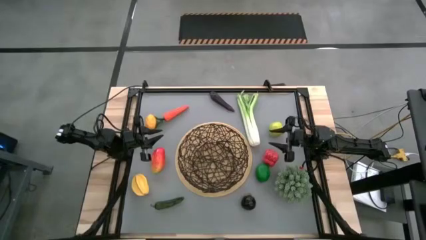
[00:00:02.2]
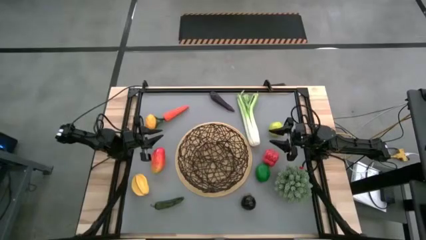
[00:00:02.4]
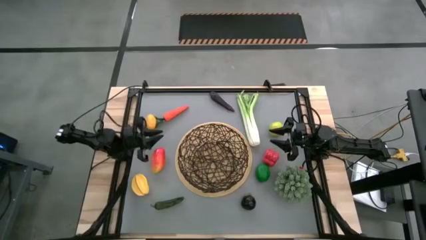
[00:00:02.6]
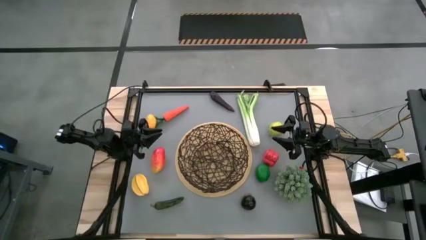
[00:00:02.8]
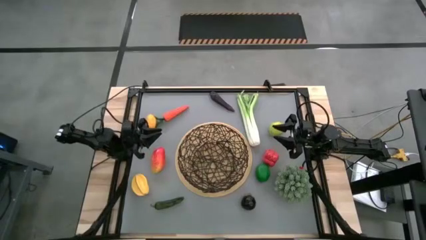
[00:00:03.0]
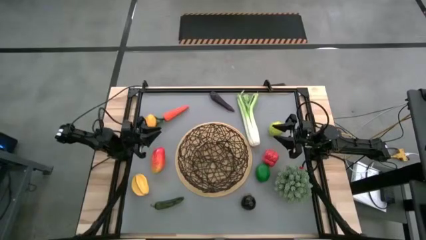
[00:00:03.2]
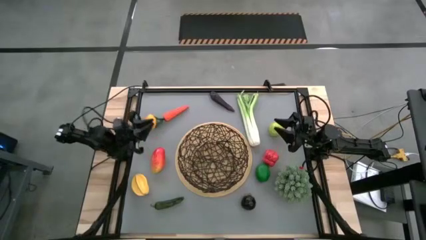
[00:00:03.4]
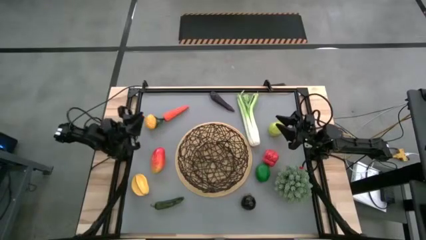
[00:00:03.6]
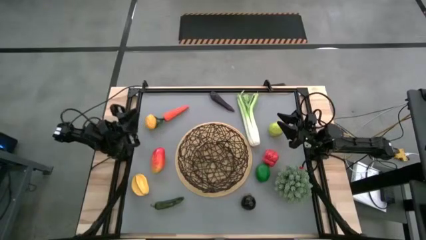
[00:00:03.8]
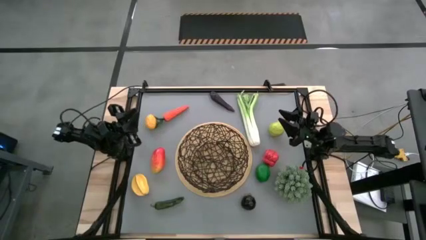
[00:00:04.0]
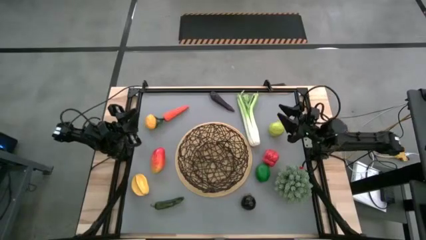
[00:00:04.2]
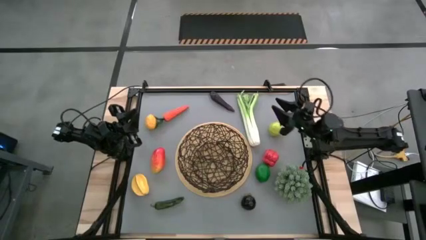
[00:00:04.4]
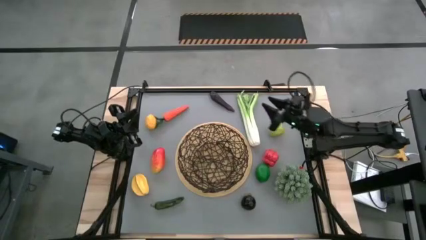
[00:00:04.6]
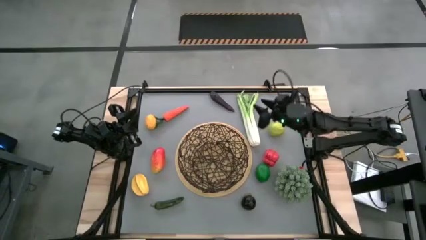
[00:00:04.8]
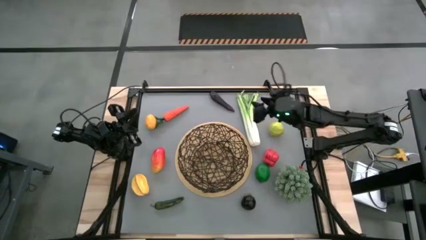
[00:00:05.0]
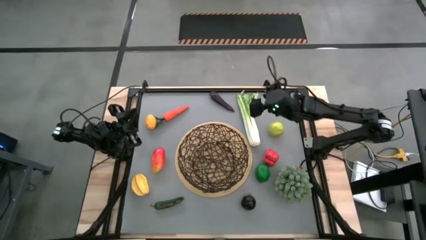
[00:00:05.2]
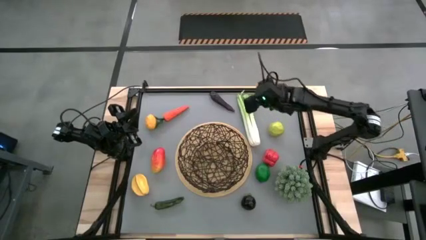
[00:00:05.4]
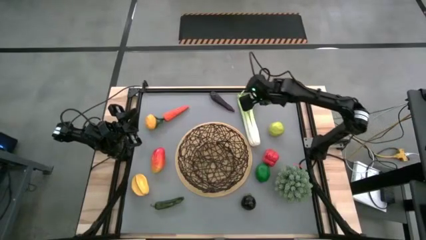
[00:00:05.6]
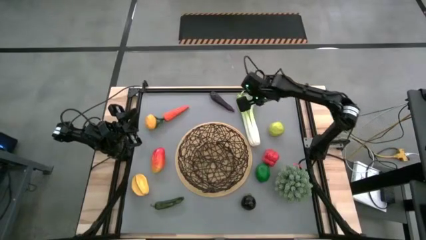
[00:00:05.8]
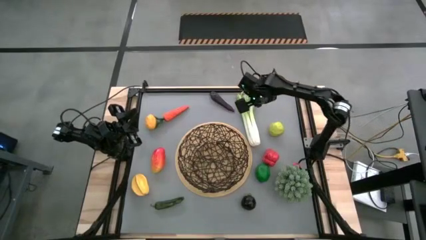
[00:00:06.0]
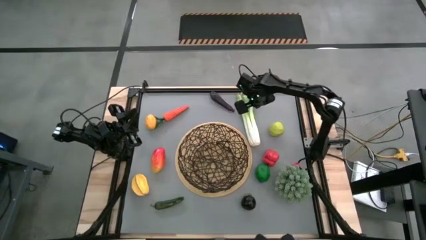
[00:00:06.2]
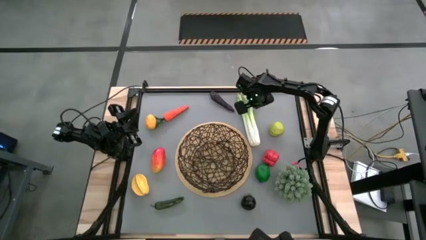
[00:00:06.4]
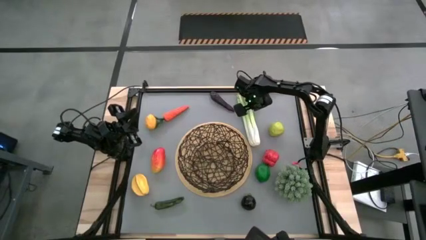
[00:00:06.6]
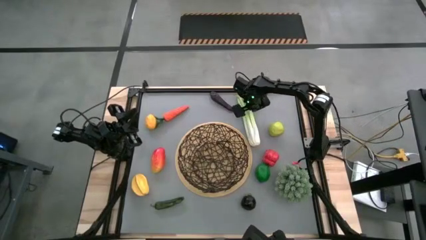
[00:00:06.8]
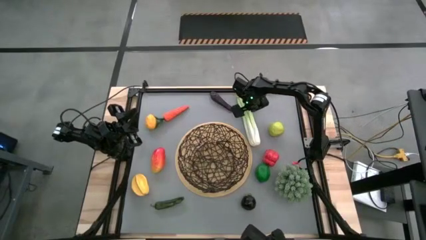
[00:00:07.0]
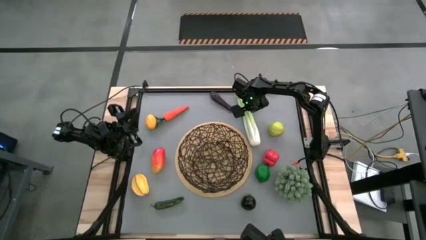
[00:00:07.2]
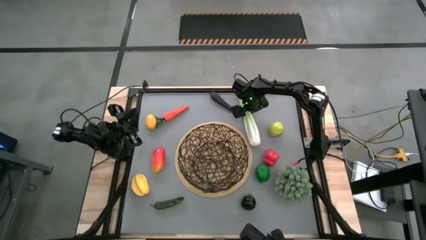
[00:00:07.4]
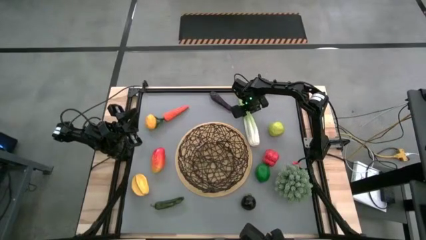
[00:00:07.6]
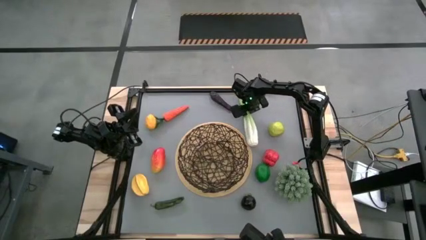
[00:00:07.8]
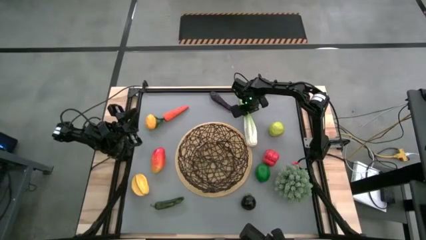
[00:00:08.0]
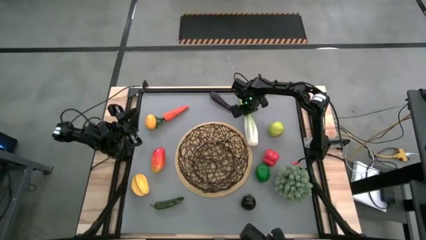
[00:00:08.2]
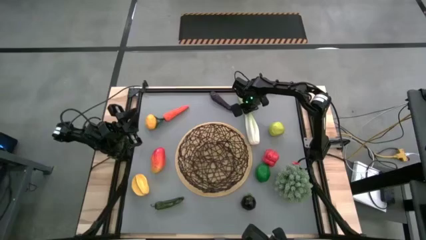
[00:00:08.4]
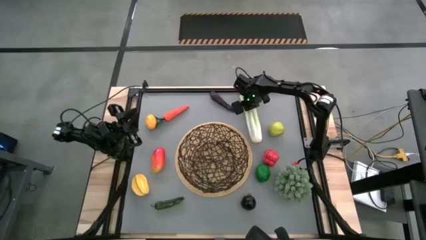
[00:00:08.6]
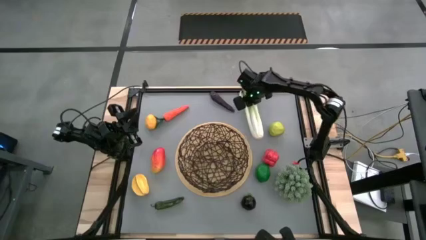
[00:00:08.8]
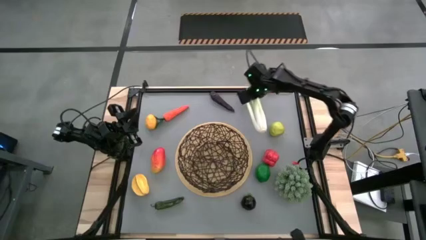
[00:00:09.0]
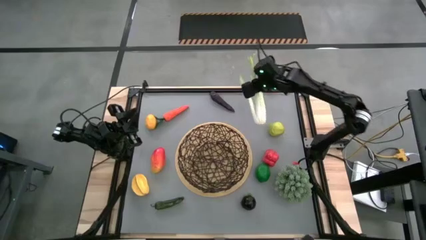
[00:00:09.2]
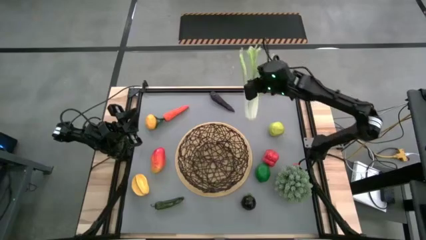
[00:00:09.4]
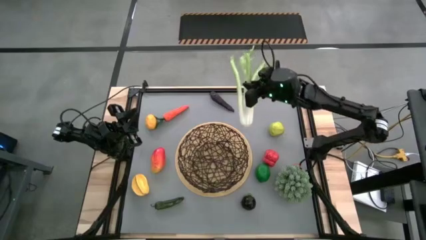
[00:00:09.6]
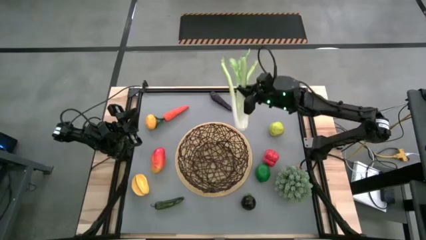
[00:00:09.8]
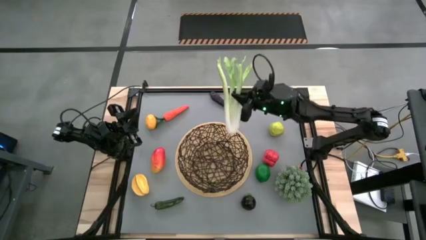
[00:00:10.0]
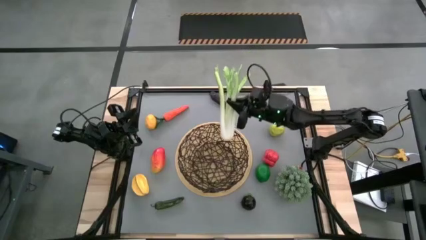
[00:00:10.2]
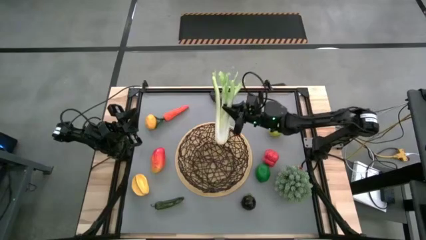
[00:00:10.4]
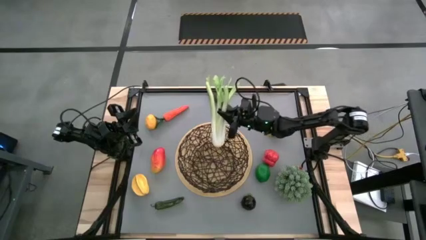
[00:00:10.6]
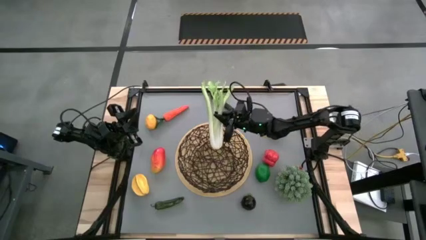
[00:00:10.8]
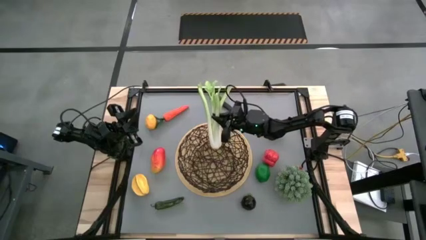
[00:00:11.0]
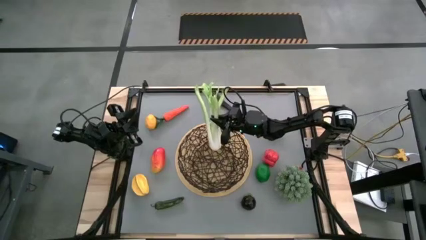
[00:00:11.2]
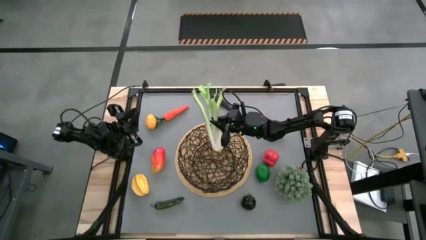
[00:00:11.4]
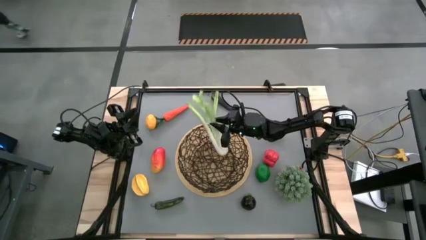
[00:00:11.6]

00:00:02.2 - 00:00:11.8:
Task: Build produce basket
Put the celery into the wire basket

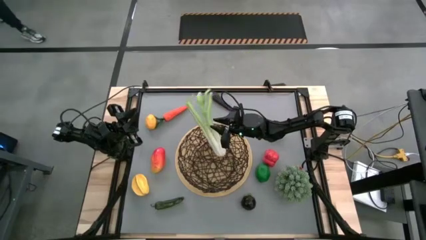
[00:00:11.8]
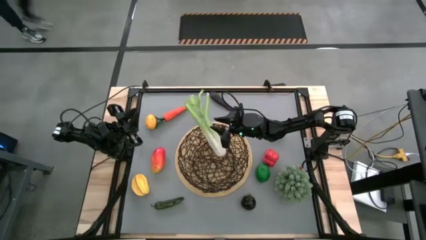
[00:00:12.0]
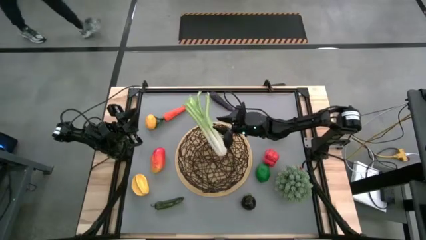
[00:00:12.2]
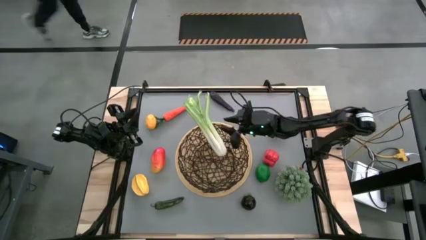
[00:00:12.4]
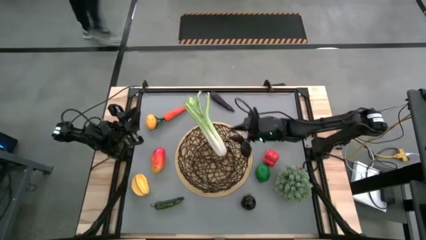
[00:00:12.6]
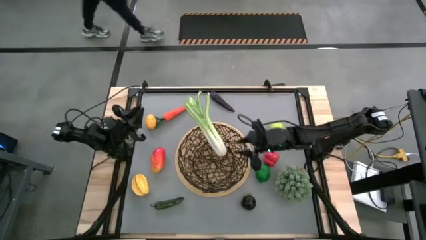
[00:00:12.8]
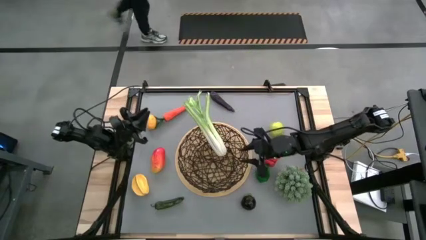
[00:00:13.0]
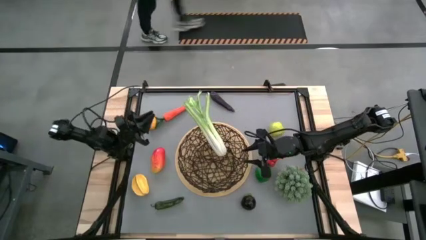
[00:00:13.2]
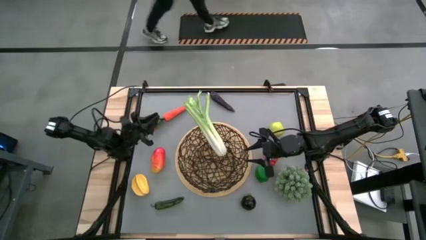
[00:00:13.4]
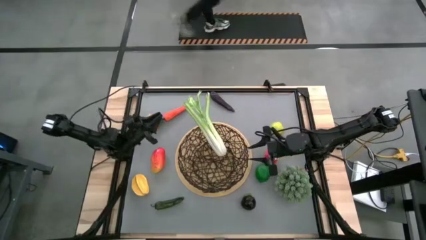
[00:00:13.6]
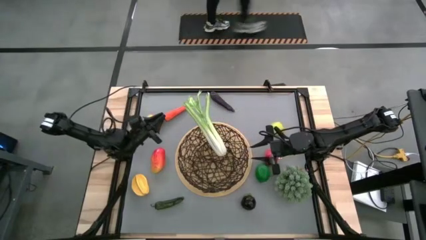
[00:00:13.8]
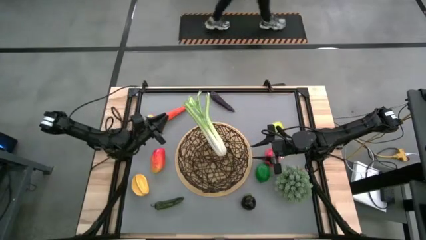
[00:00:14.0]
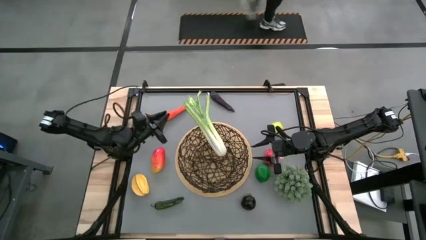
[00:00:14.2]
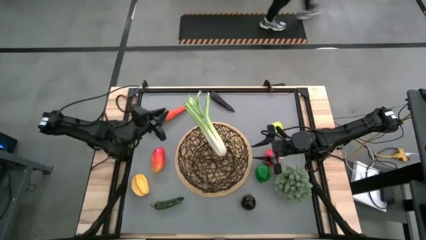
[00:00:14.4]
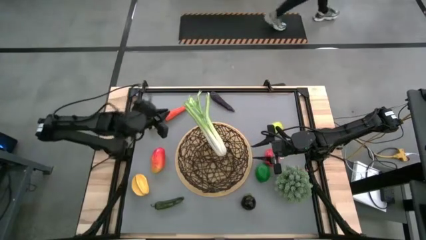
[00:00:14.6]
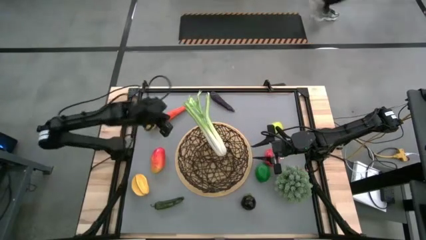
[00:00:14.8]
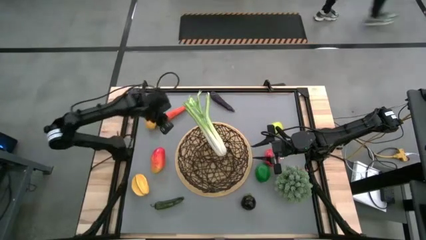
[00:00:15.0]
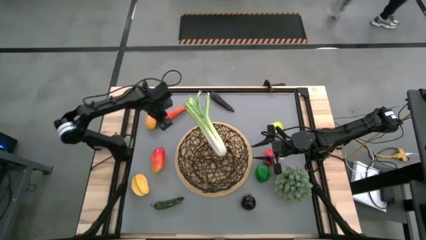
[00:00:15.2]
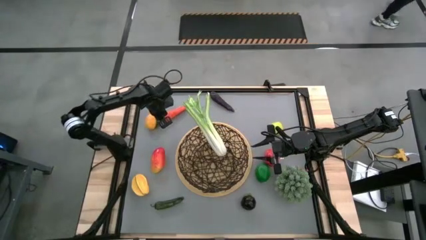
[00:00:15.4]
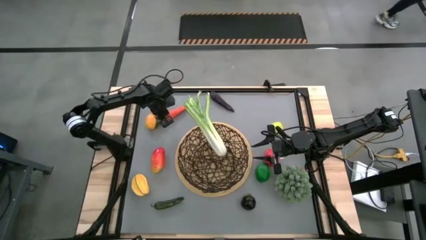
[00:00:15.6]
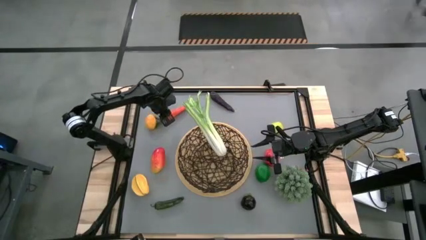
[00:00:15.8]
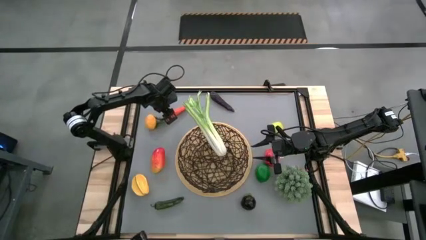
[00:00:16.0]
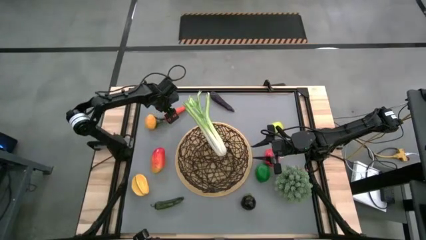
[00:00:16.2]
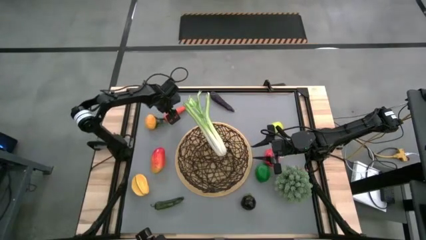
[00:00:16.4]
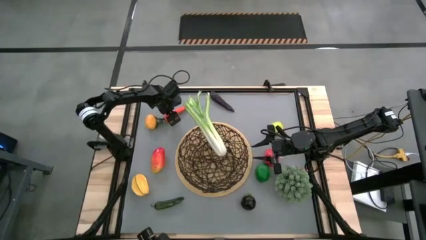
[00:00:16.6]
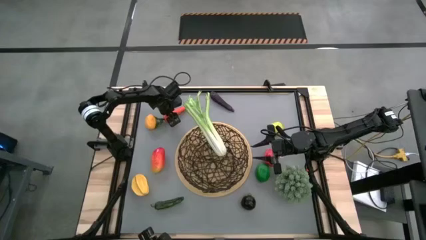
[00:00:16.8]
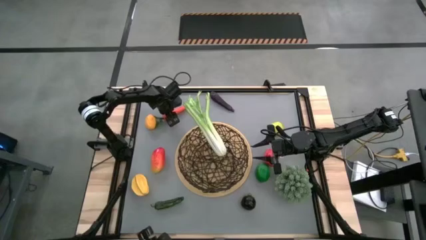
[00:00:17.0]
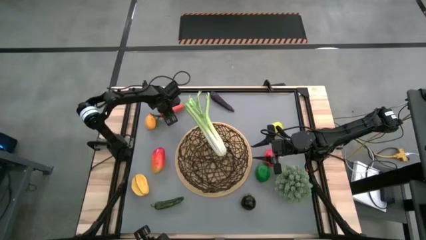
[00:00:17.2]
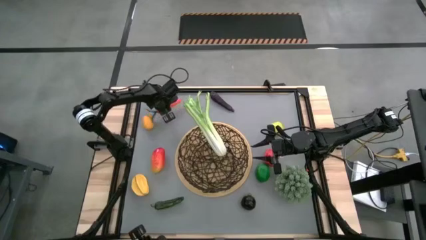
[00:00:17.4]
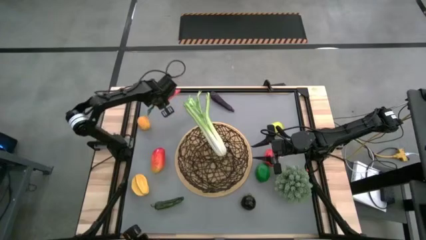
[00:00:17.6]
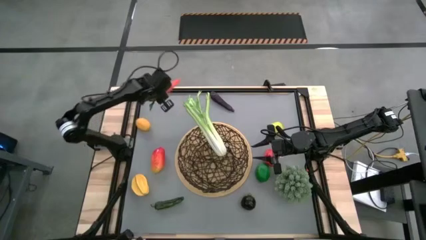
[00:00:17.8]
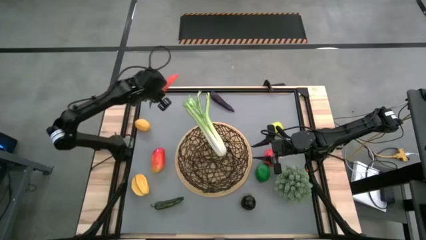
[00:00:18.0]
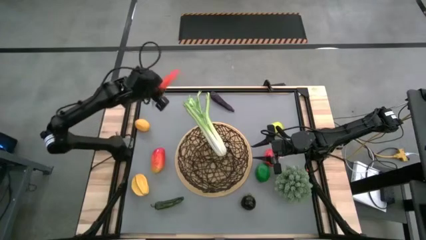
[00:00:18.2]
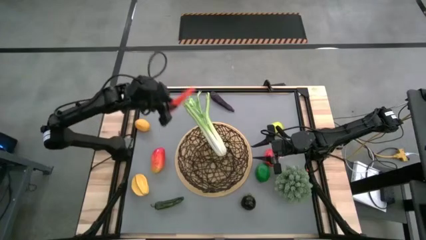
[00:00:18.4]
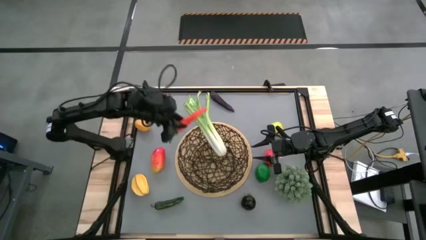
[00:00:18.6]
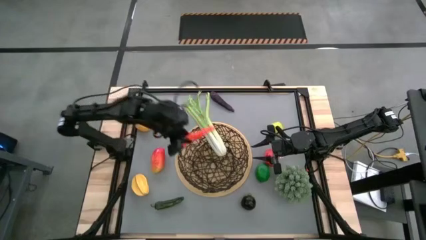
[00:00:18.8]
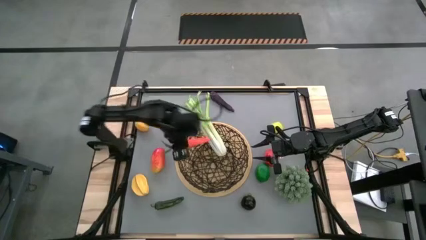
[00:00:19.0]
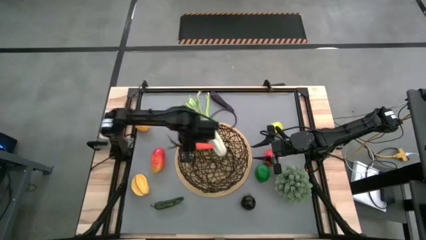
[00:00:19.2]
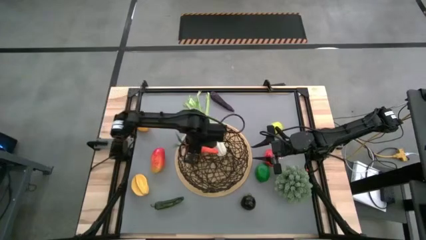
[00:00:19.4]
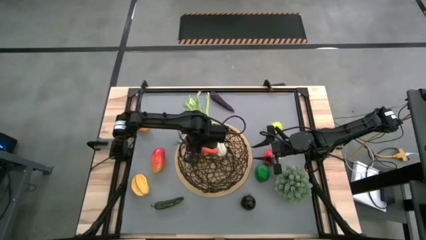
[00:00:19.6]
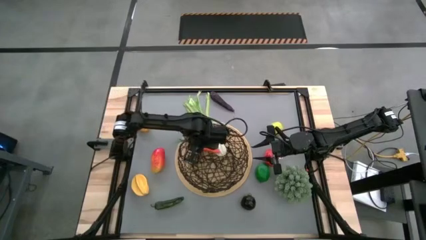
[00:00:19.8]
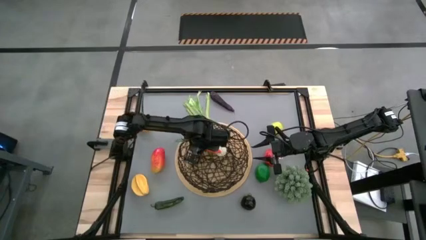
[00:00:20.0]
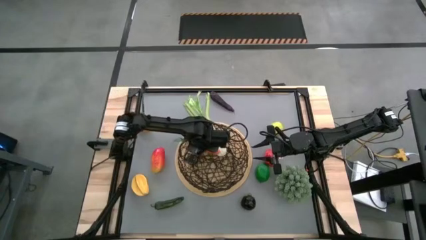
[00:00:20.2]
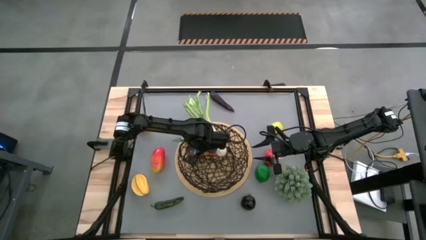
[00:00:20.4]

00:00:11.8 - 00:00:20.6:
Put the carrot into the wire basket
